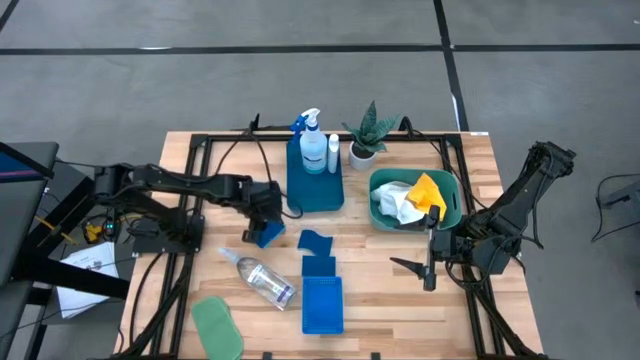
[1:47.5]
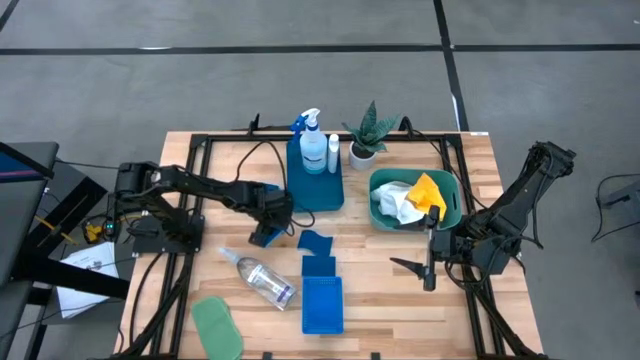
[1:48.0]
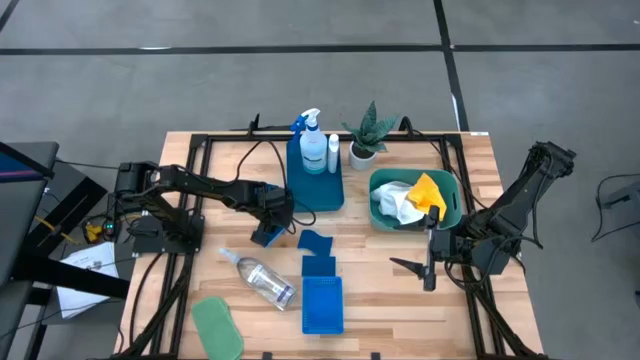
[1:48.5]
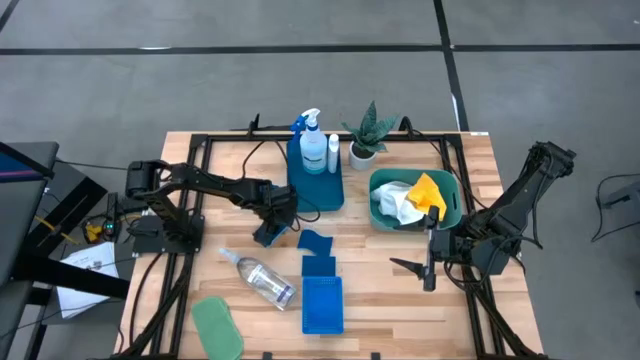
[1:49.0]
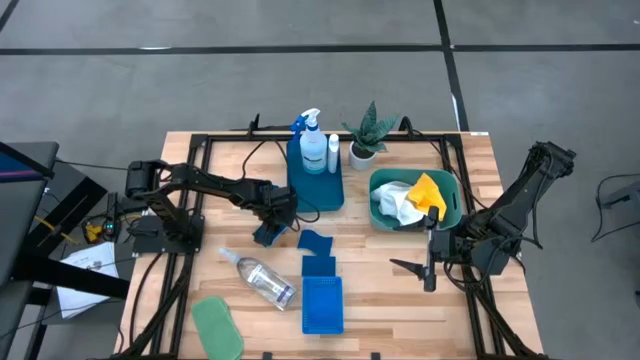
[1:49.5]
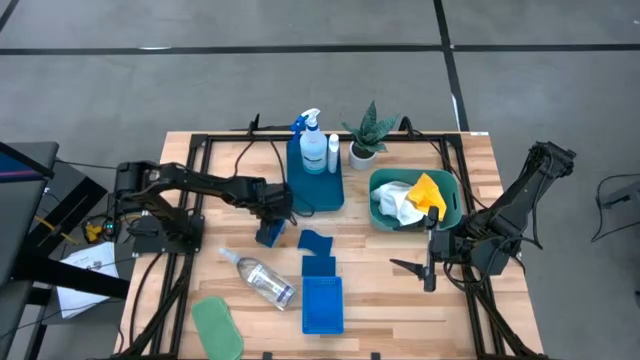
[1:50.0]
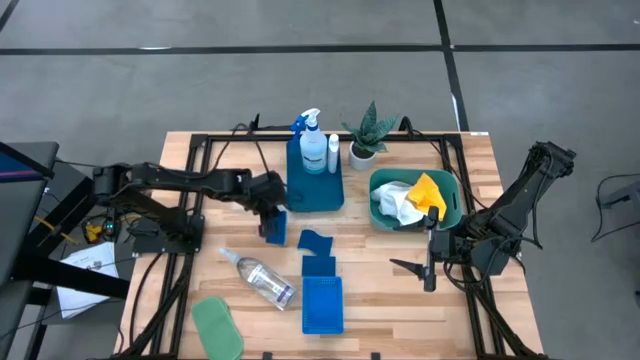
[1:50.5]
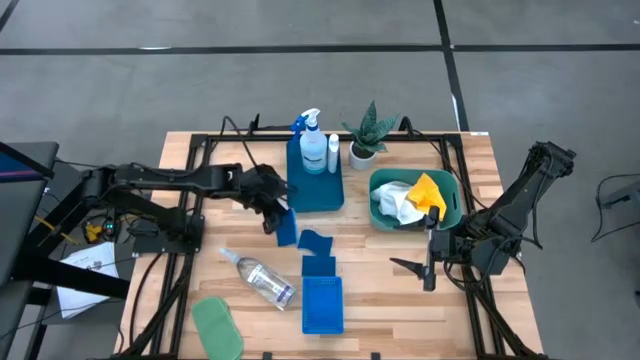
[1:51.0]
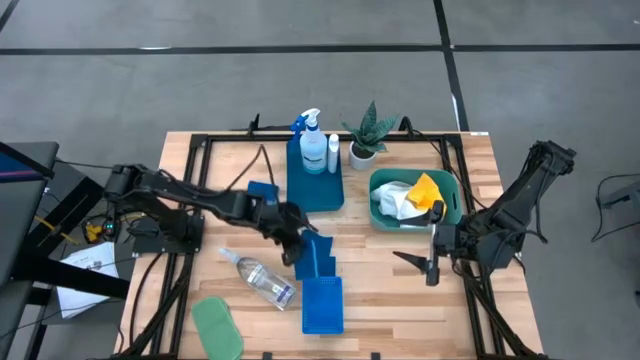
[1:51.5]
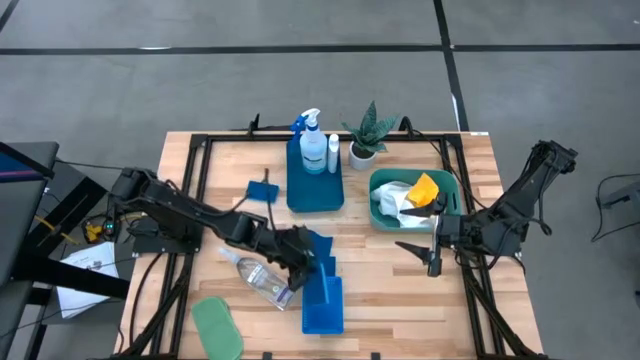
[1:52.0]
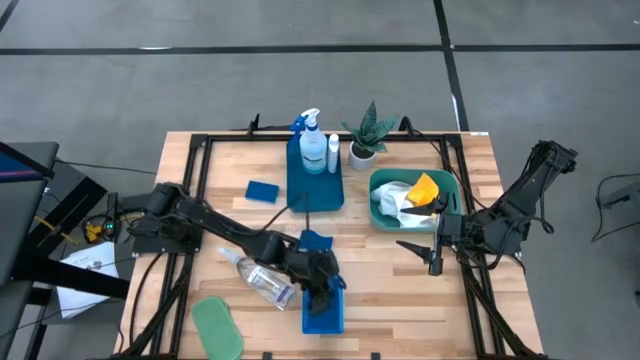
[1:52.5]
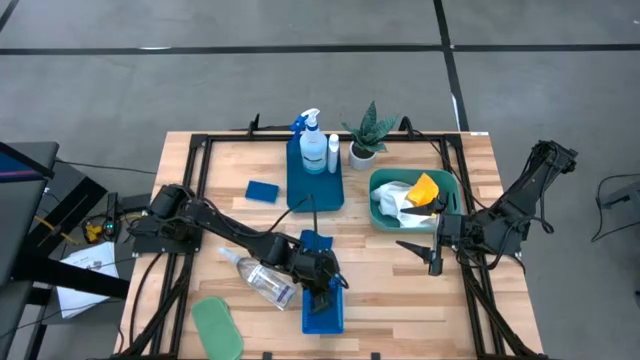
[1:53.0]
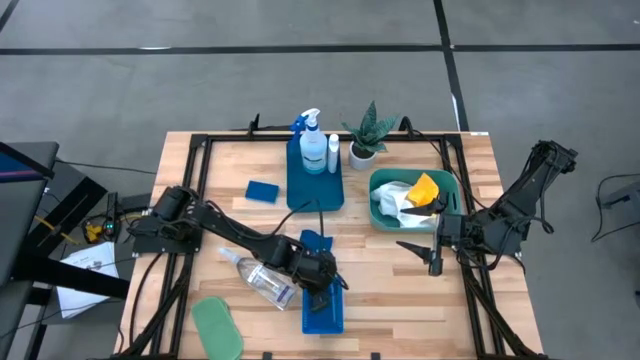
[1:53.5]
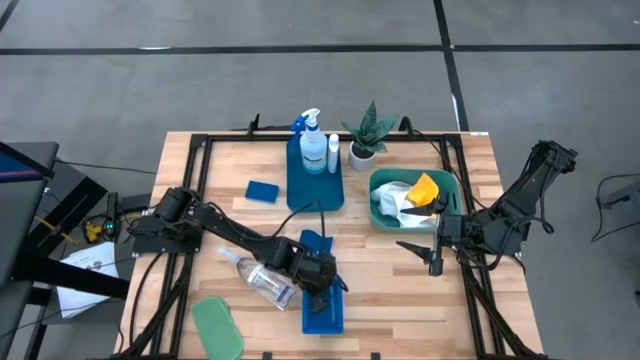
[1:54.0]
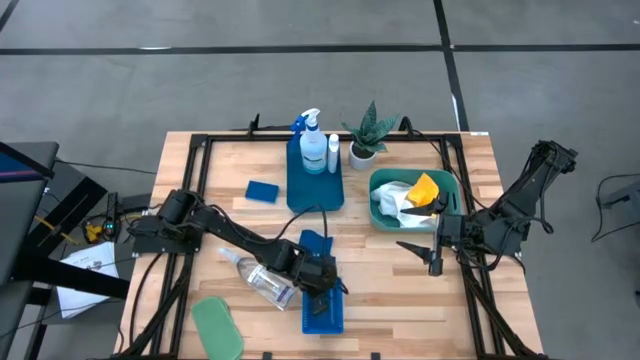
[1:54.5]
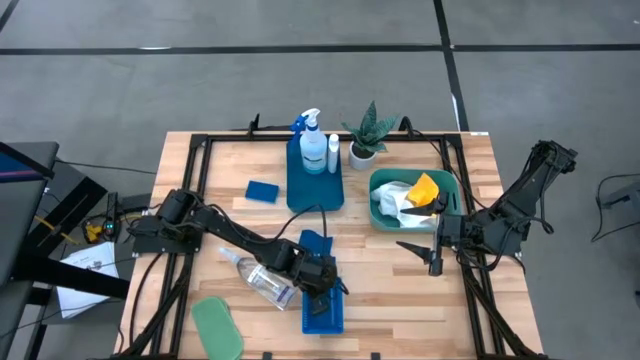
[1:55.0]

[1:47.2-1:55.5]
Task: Pick & Place Kitchen Items
Put the blue sponge into the blue basket

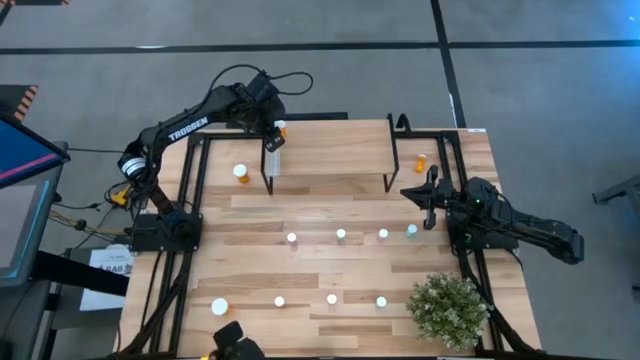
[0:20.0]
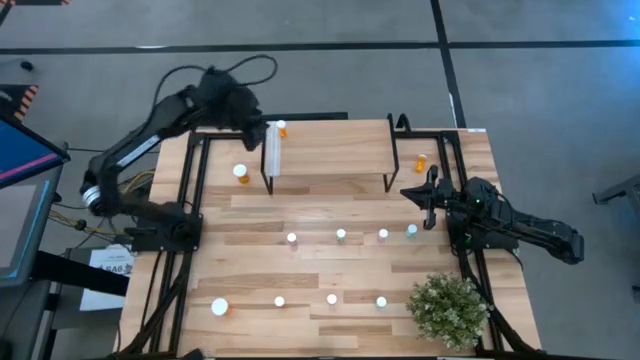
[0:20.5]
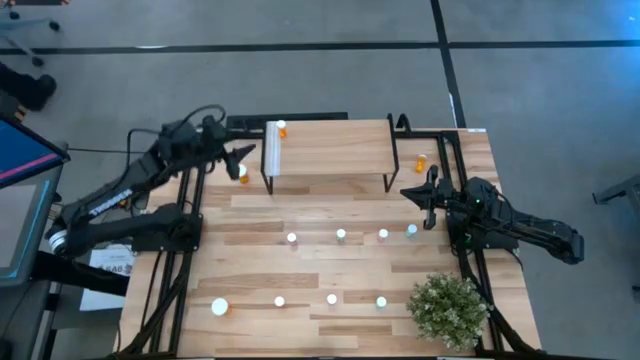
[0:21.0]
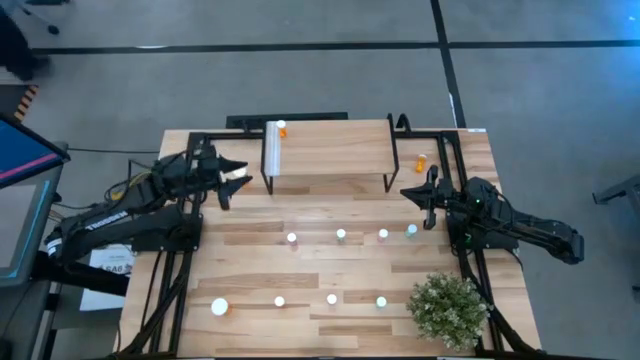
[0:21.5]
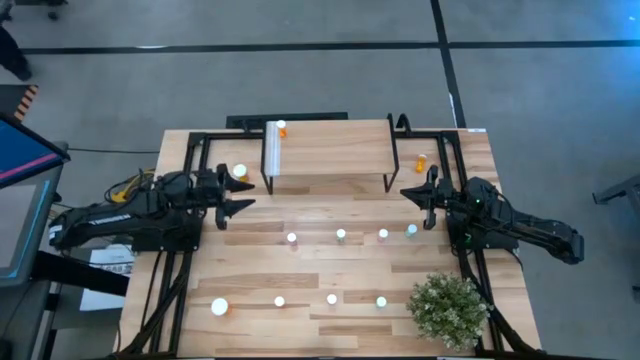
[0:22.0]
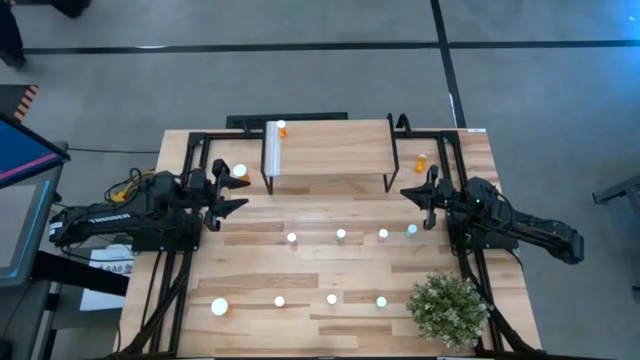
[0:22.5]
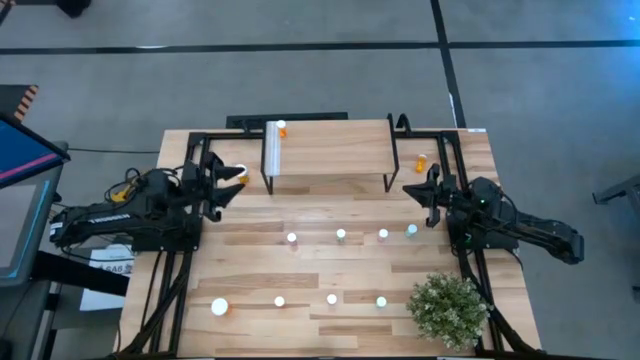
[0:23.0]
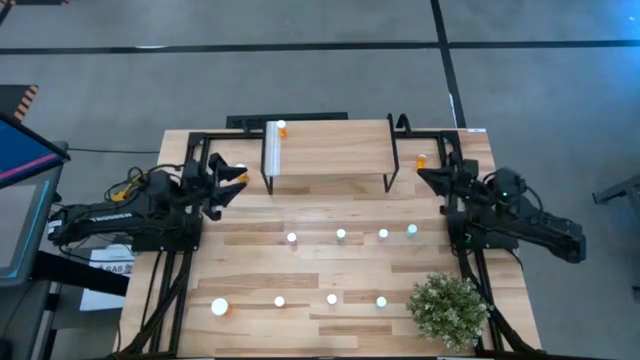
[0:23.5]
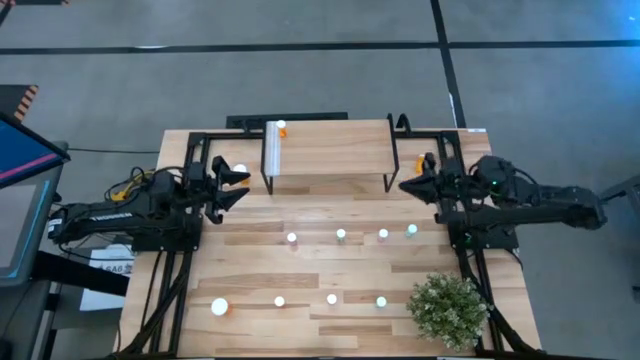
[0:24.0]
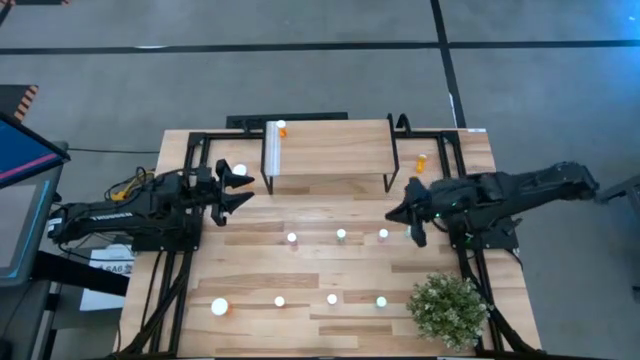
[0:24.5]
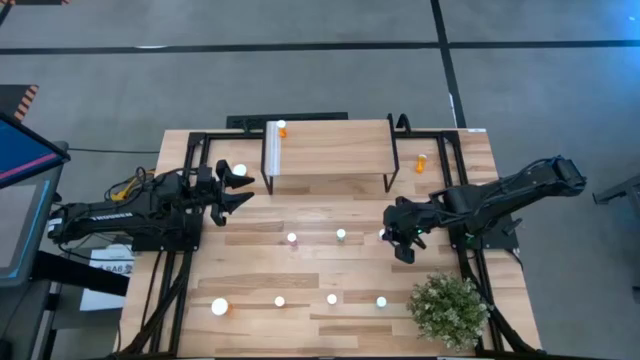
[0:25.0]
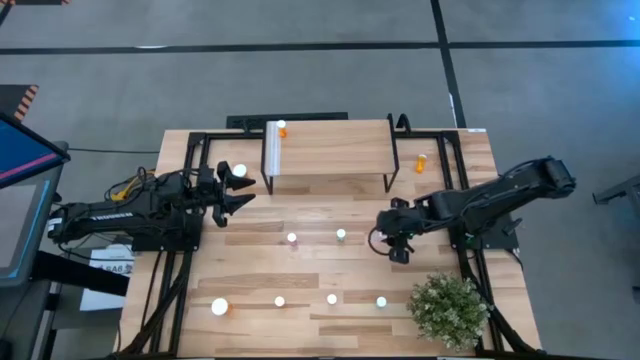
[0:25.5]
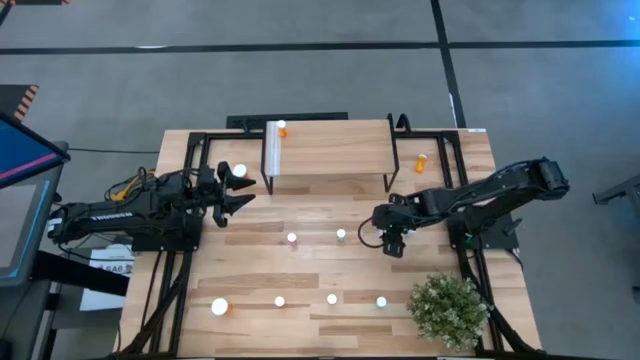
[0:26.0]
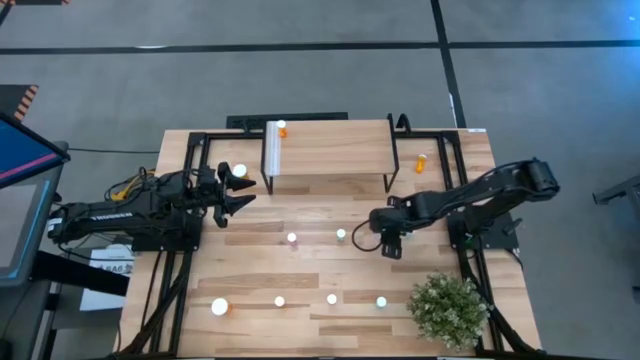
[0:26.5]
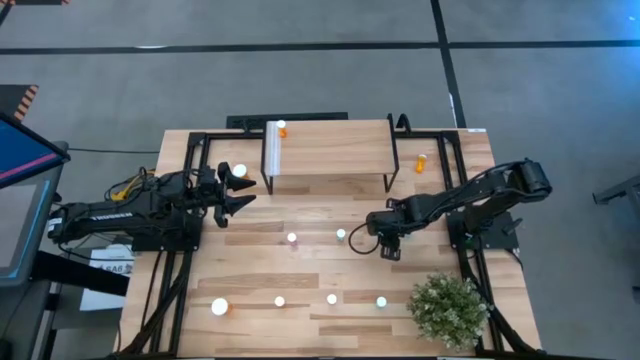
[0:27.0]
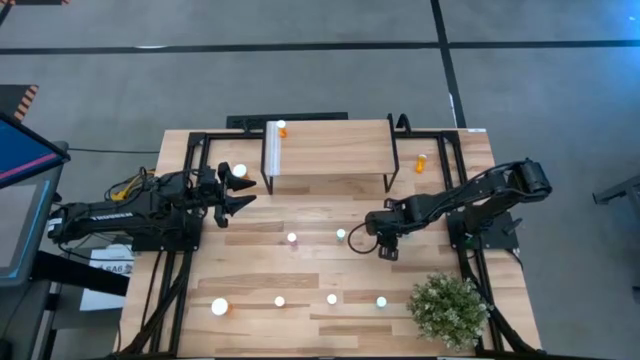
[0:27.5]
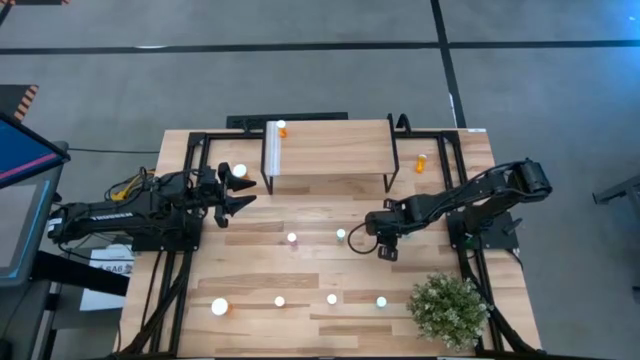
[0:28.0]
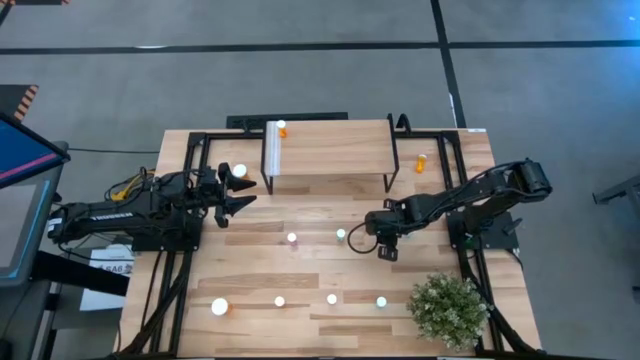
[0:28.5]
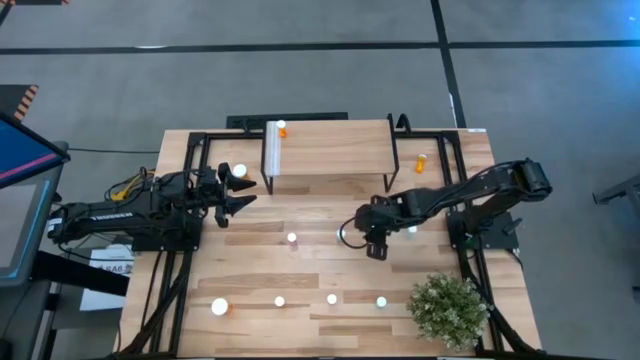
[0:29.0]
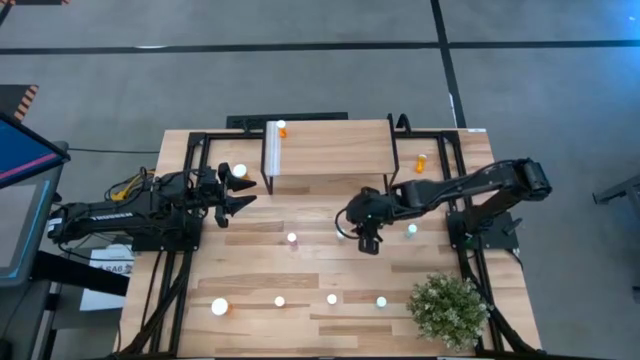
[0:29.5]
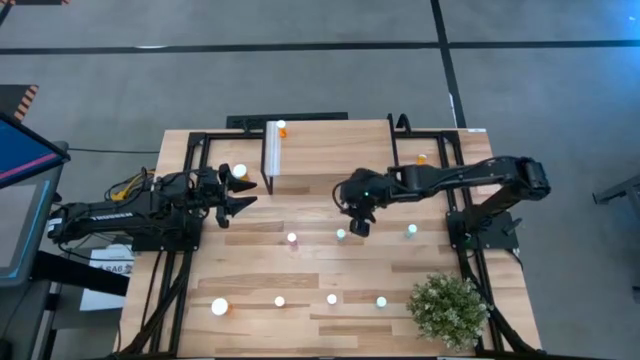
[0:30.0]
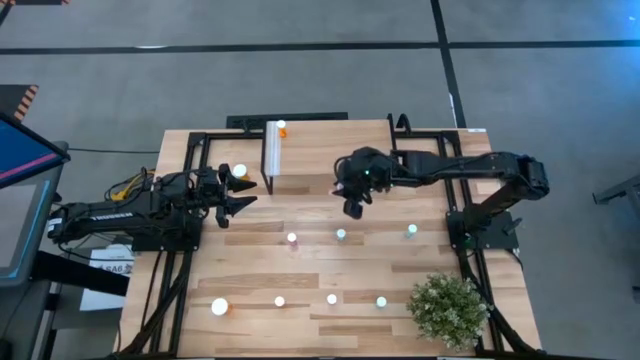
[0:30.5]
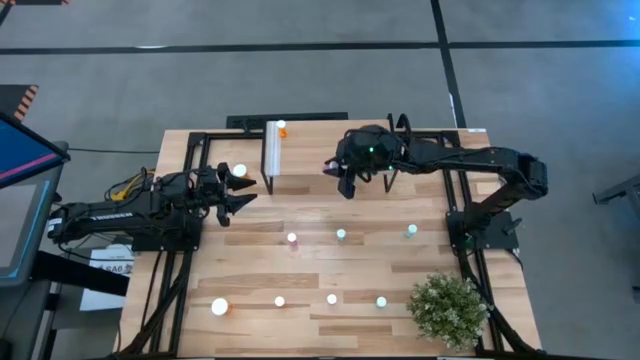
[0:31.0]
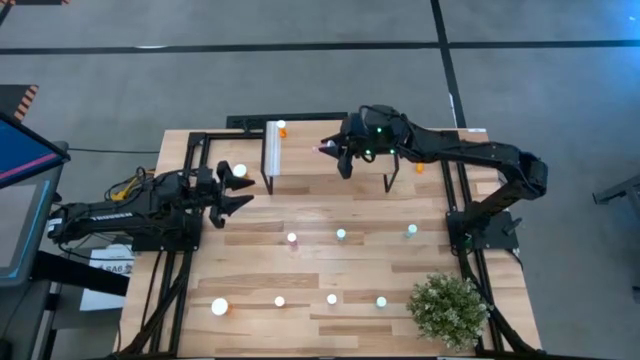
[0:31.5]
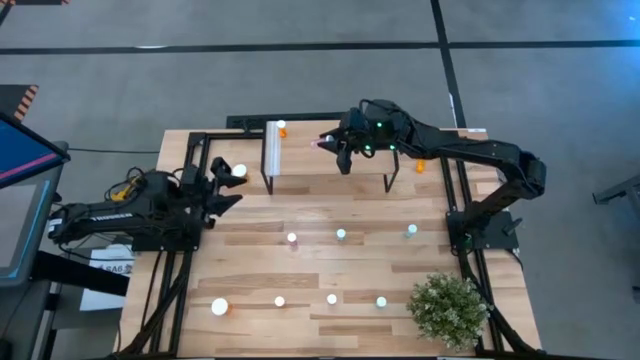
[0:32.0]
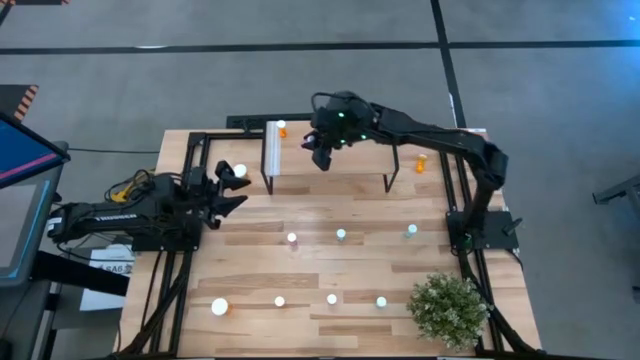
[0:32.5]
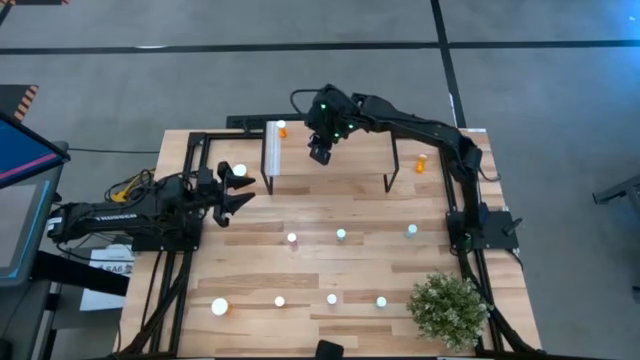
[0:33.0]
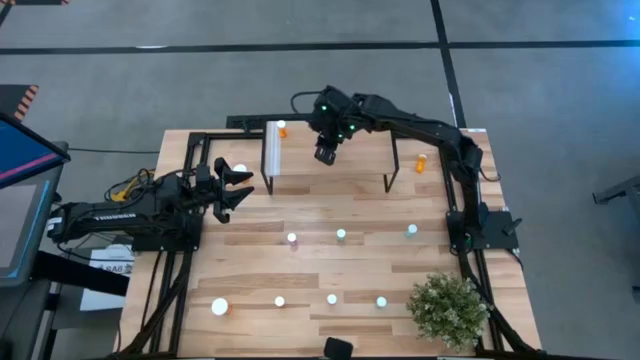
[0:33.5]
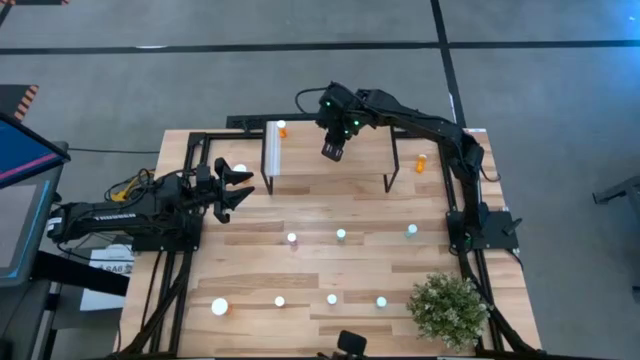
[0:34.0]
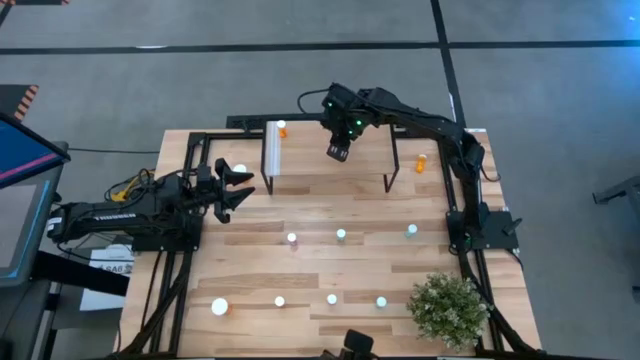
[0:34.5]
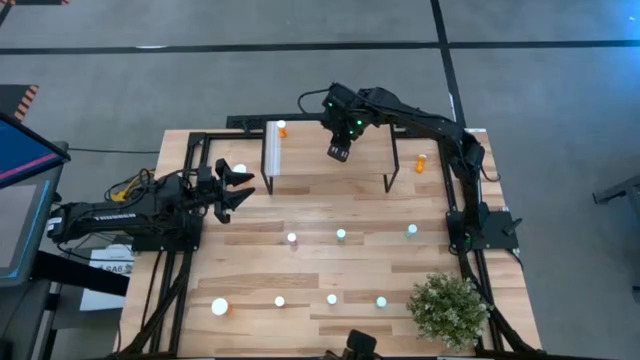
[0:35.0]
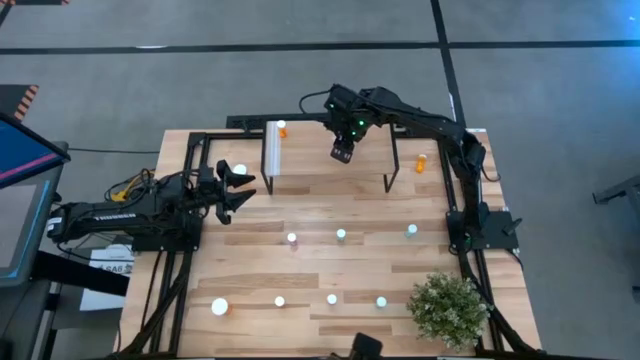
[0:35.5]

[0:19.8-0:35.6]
Task: Pick and place medicine bottles onto shelf by color
Put the top right pink pill bottle on the shelf
